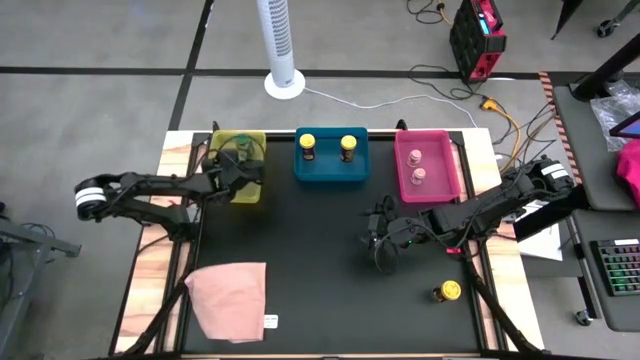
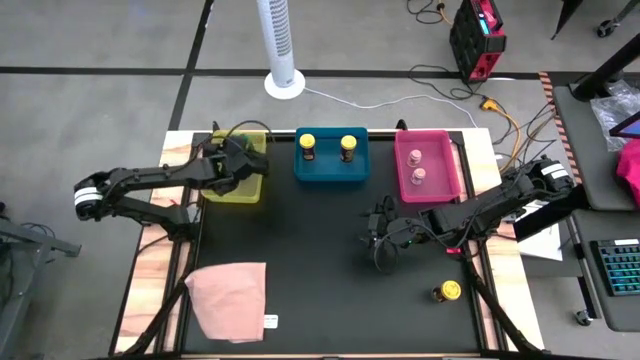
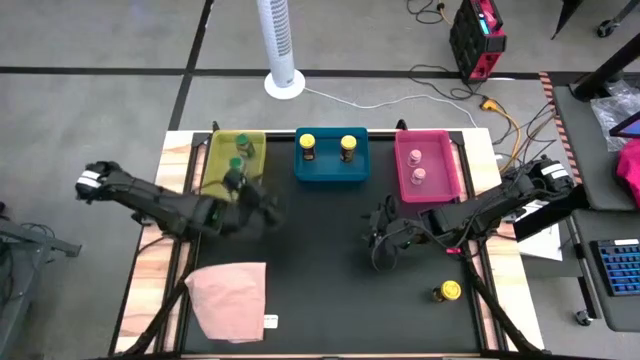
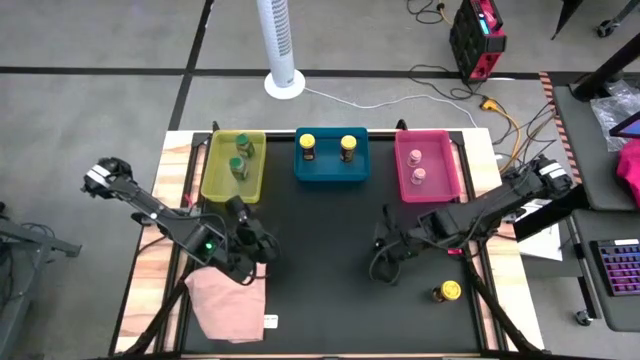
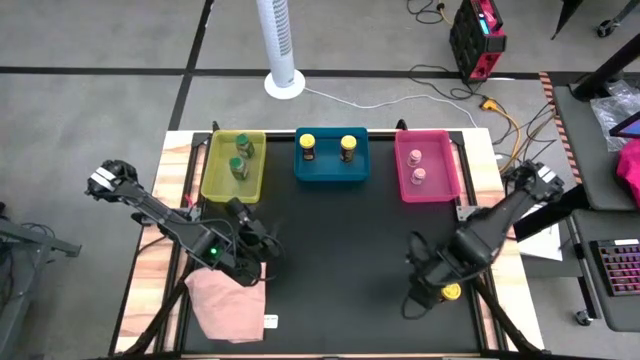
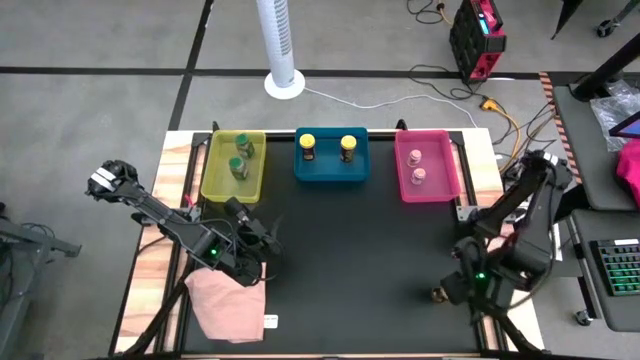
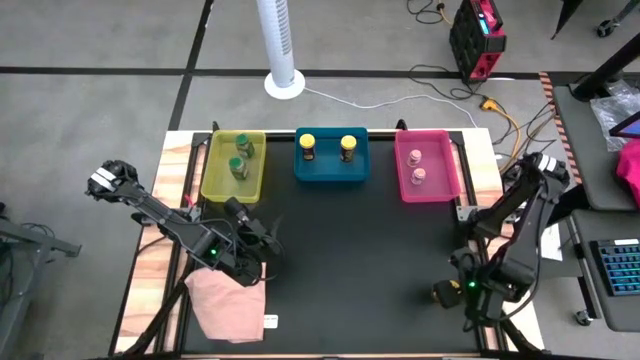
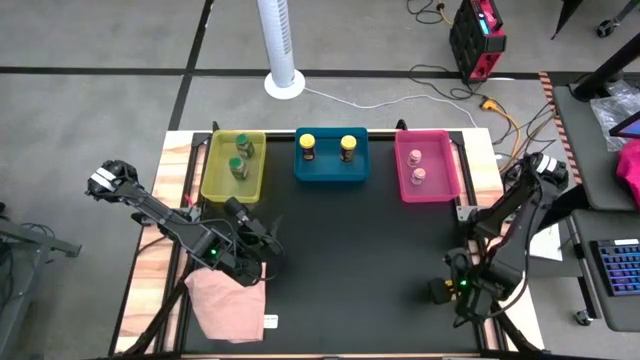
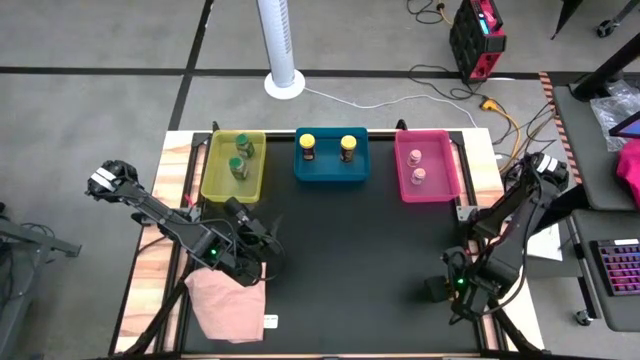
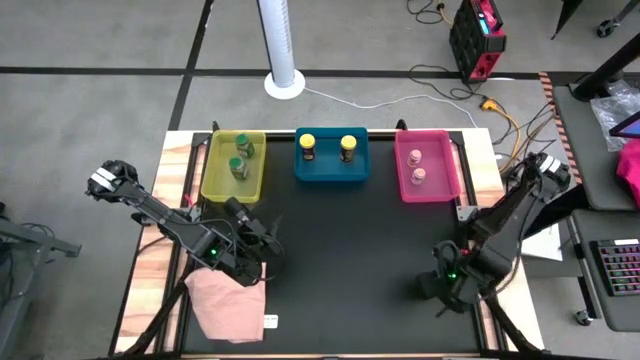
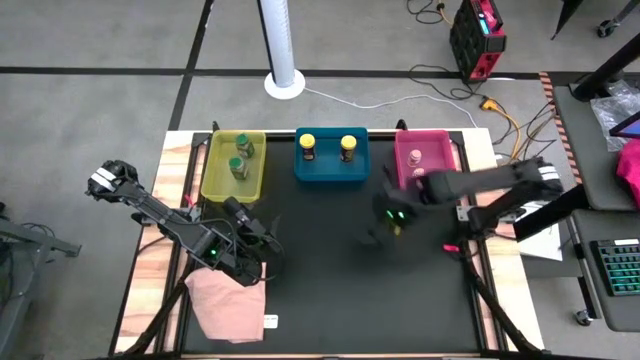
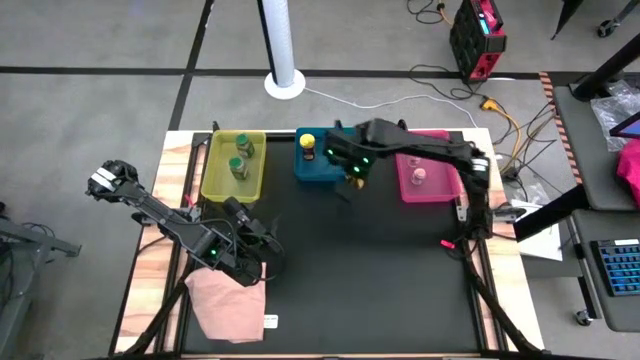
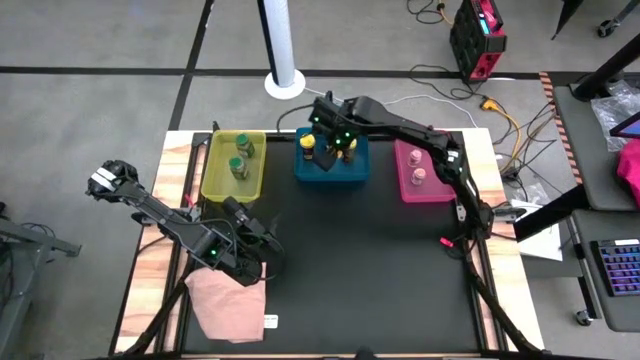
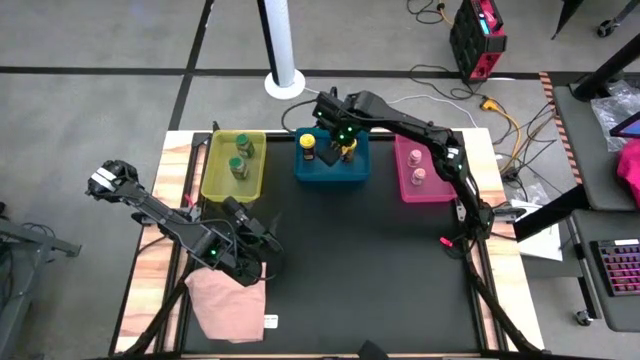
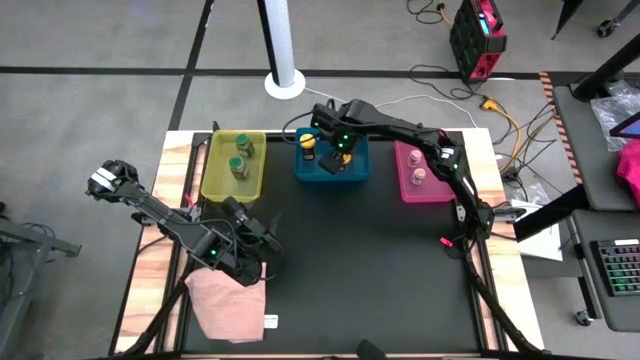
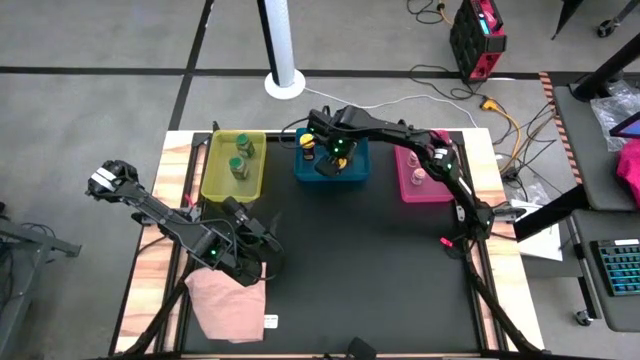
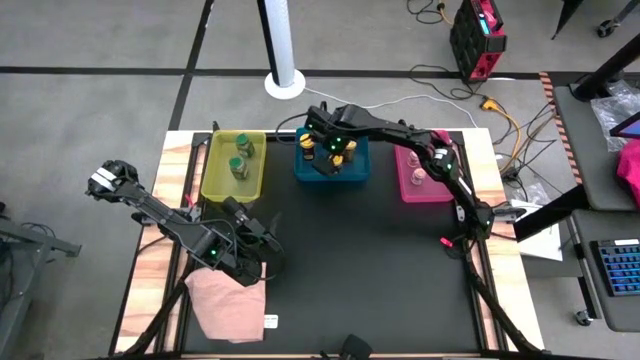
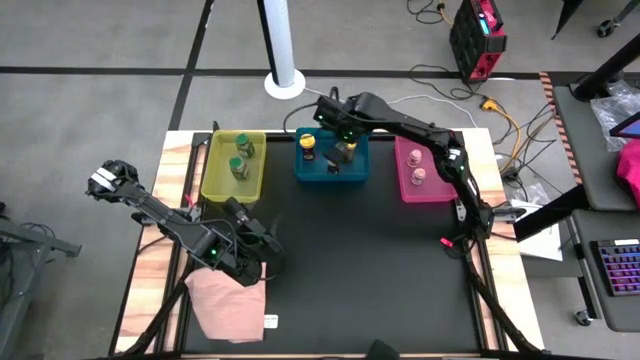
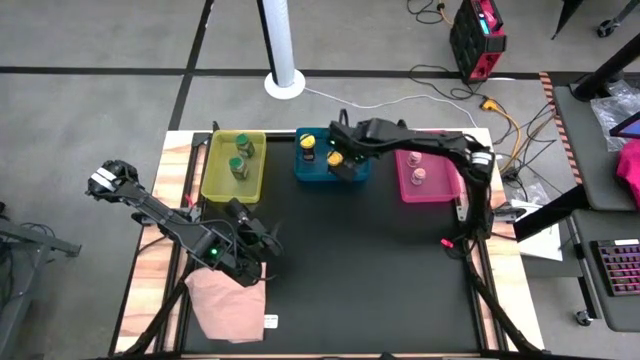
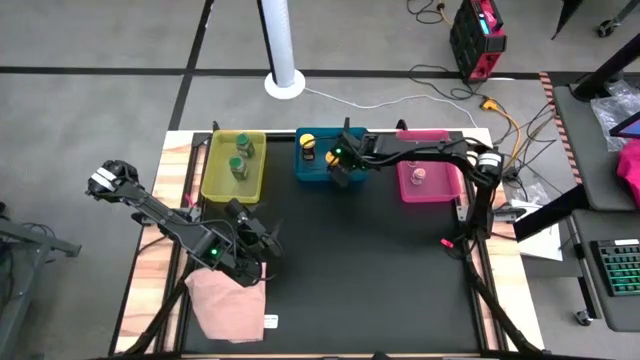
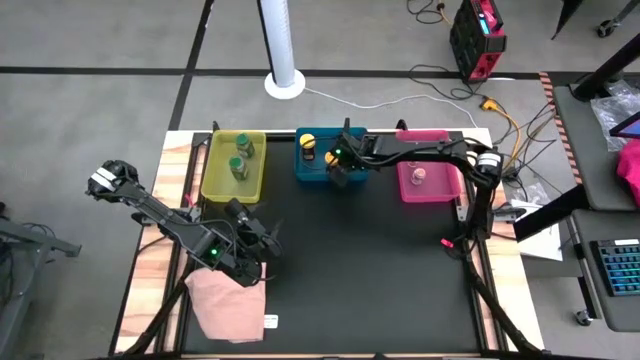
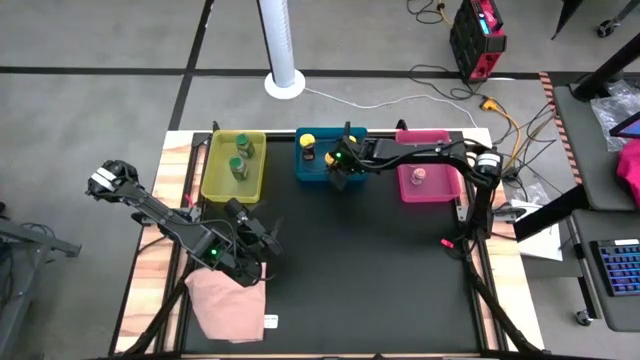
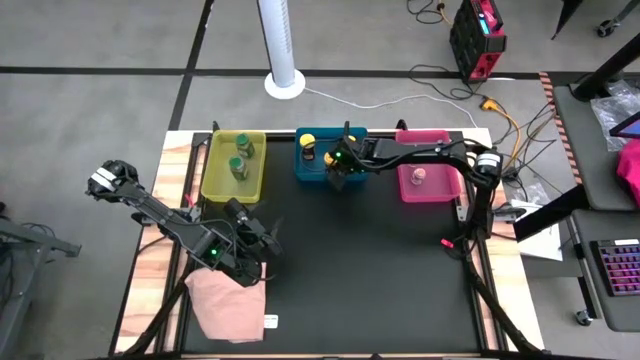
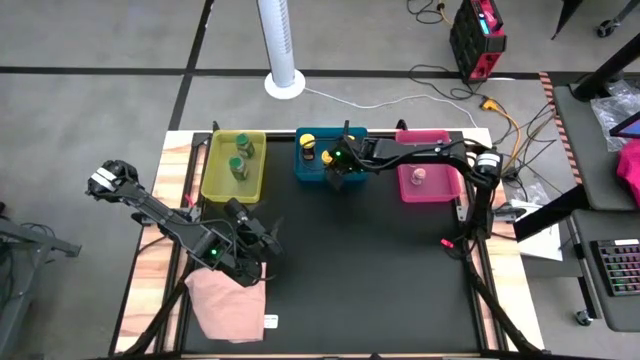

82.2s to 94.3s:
Task: Sort spices by type
Put the yellow seasoning bottle into the blue bin

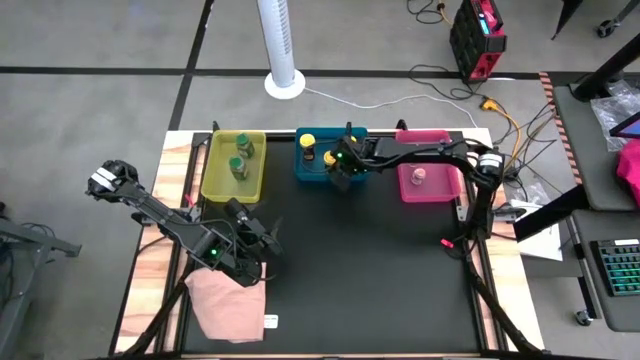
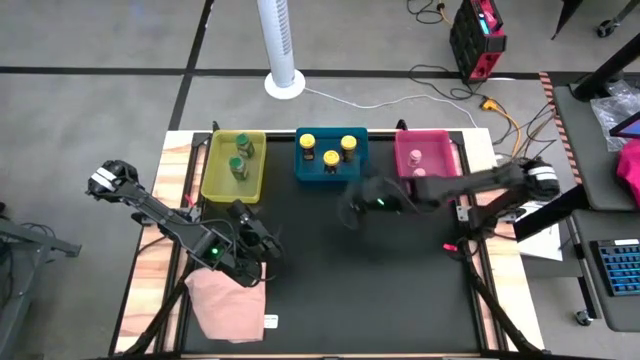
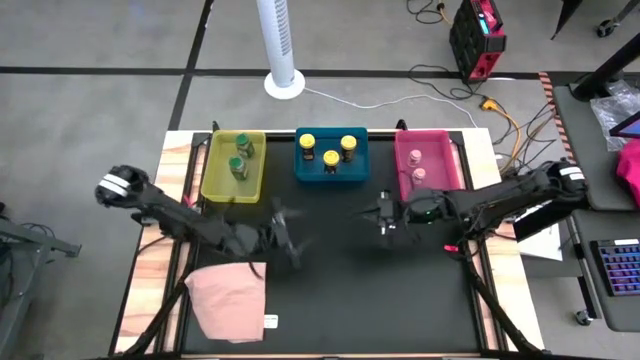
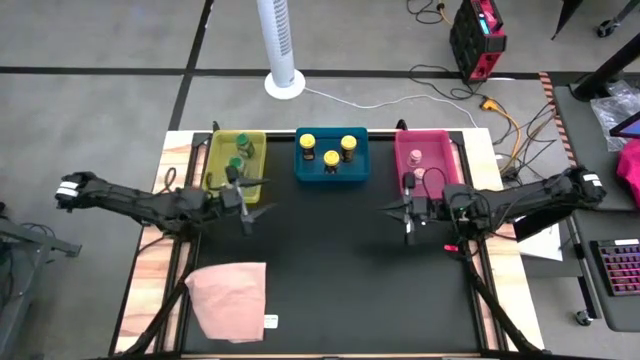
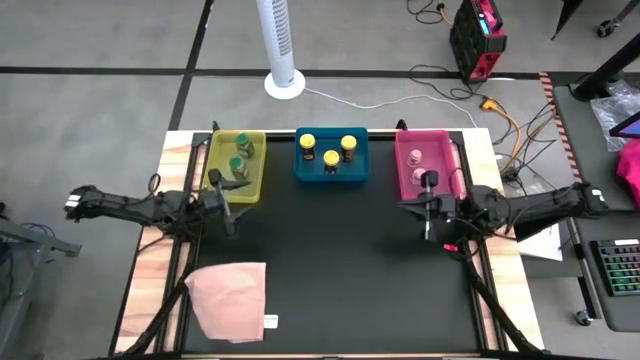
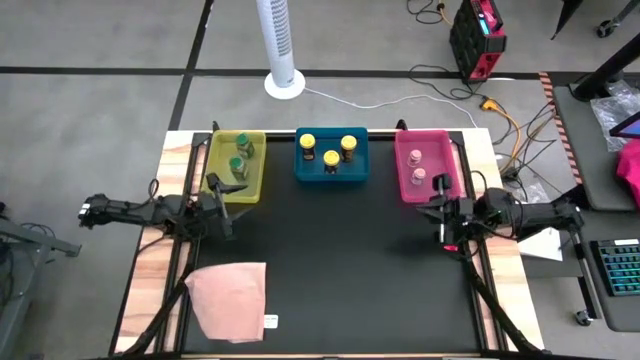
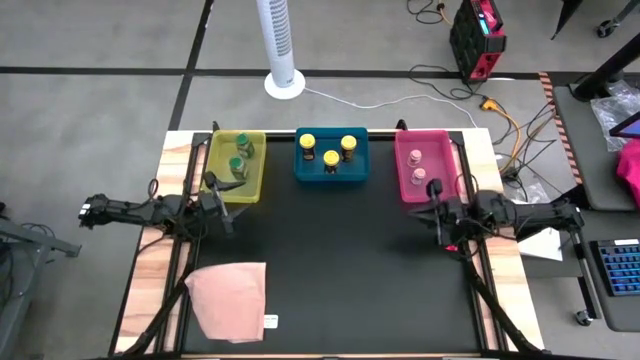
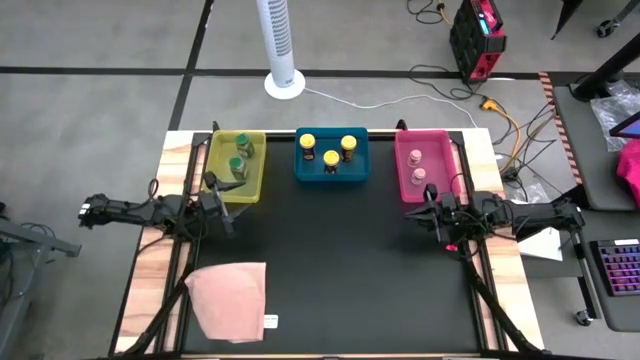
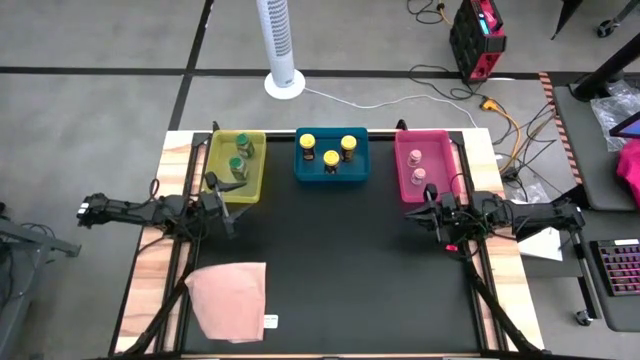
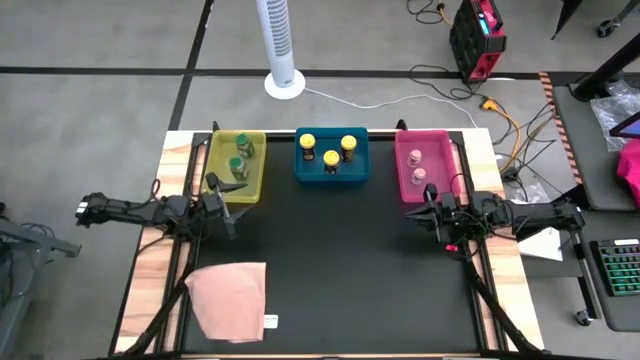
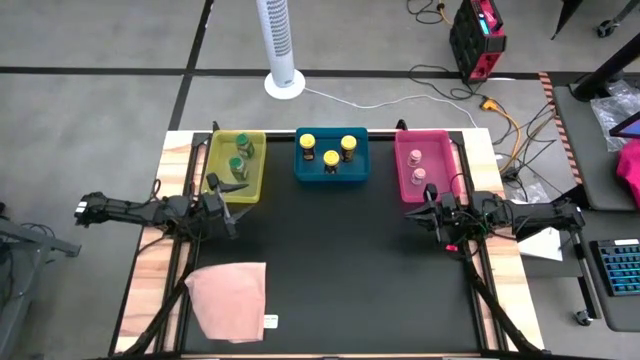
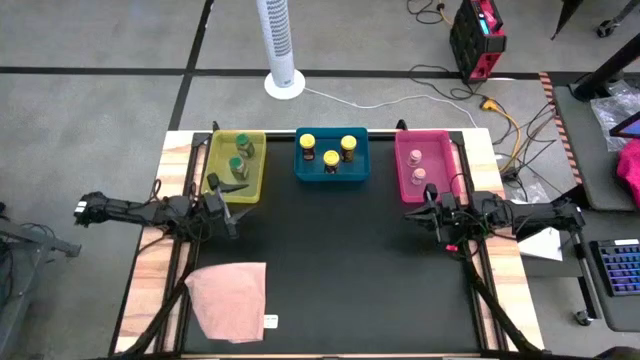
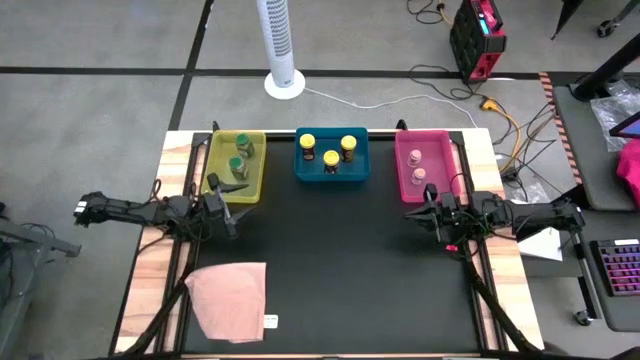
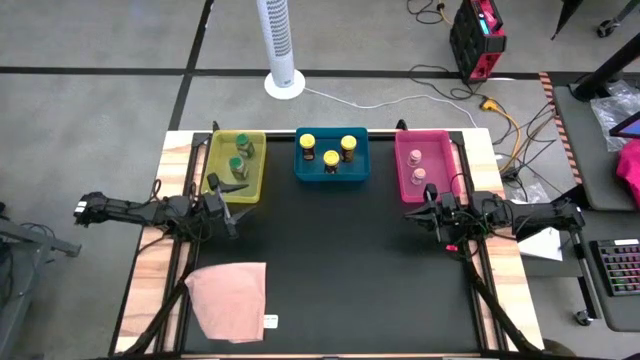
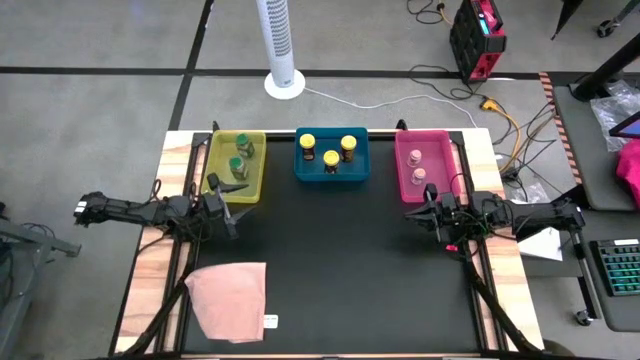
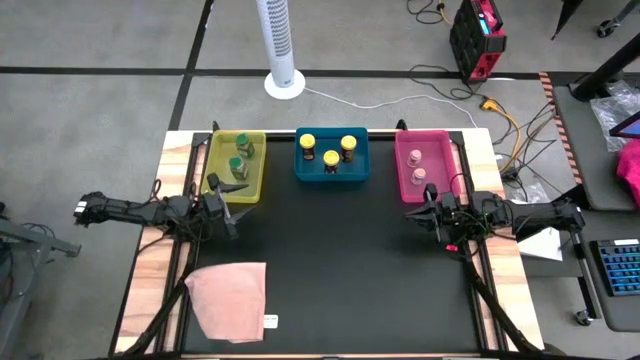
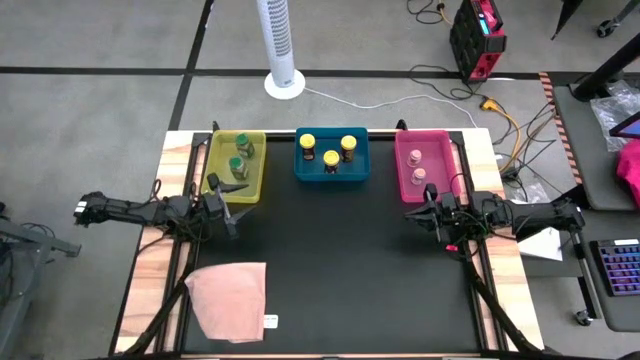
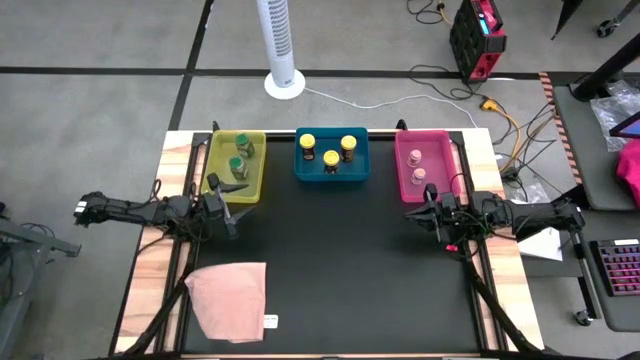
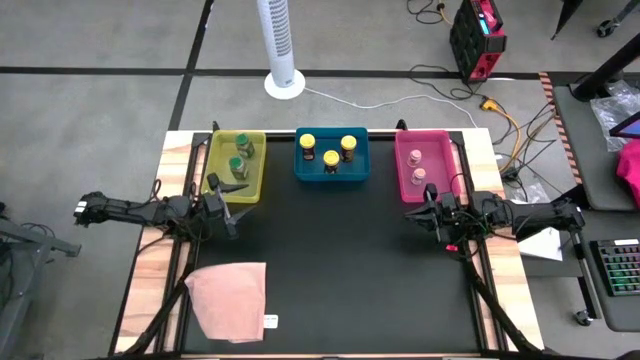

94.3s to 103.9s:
Return to Home Position

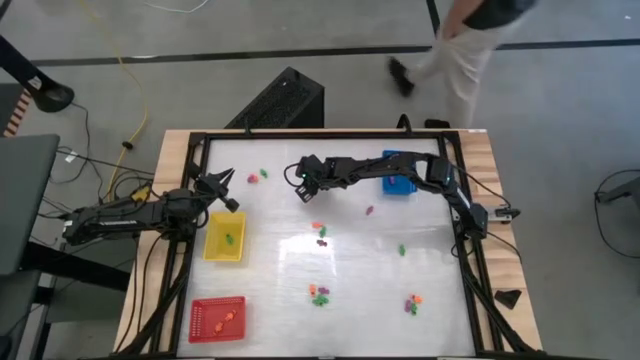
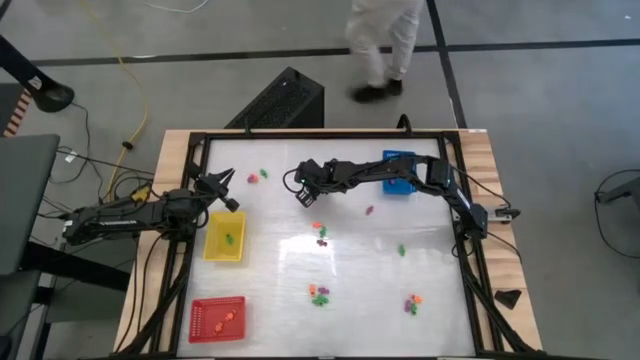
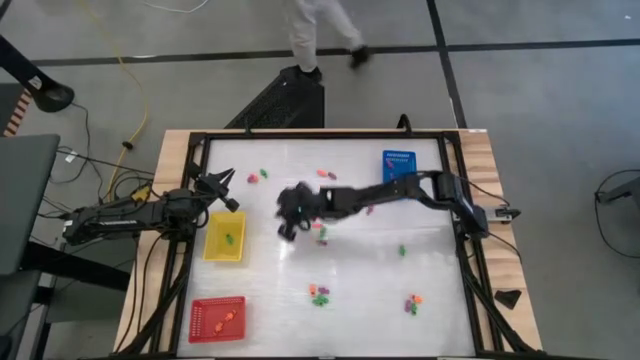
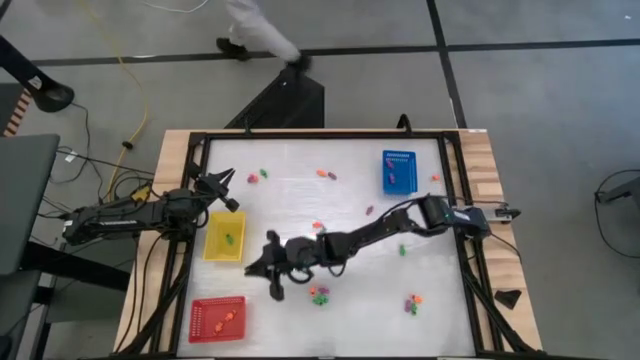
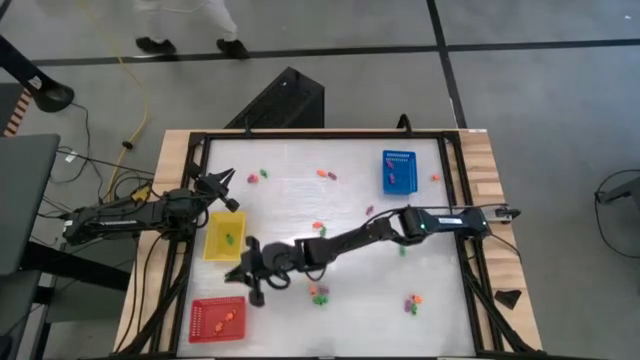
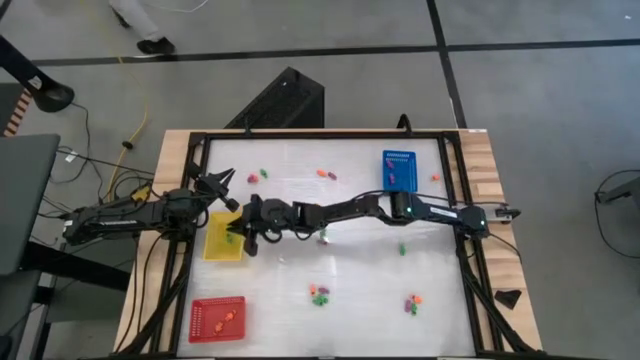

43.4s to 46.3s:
Task: Sort Halloween decoration
Put the green skeleton toy into the yellow bin
